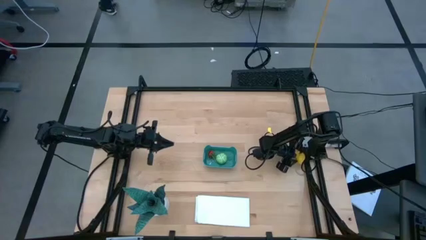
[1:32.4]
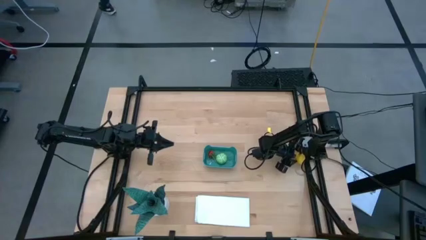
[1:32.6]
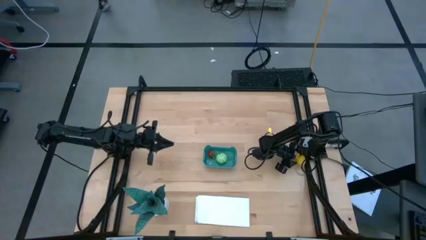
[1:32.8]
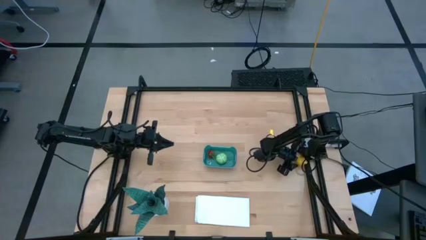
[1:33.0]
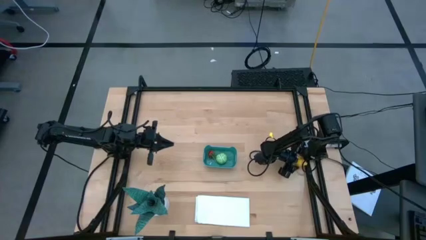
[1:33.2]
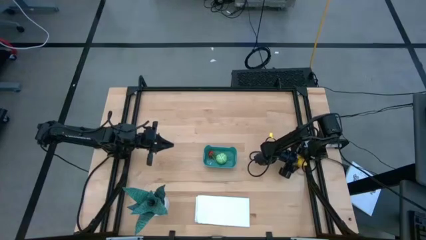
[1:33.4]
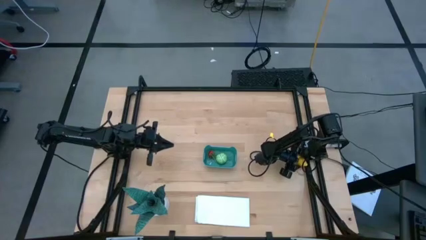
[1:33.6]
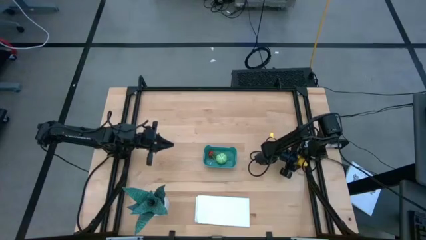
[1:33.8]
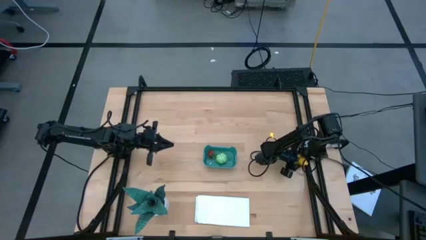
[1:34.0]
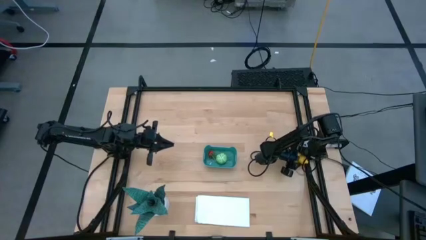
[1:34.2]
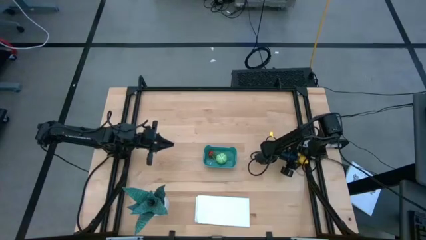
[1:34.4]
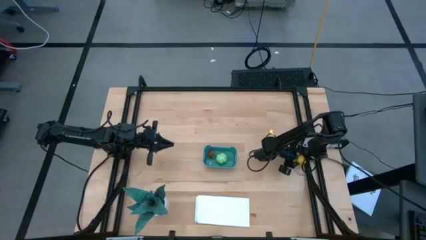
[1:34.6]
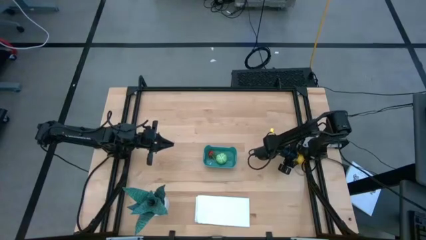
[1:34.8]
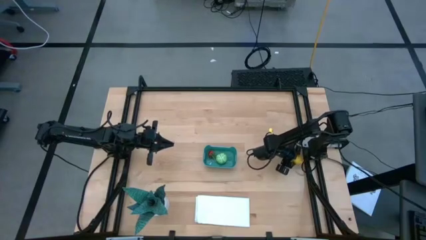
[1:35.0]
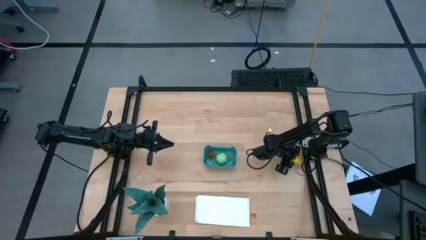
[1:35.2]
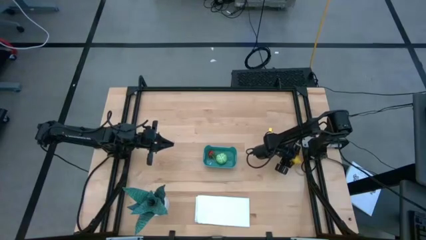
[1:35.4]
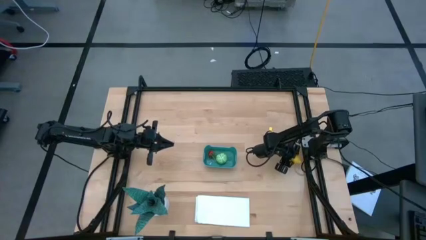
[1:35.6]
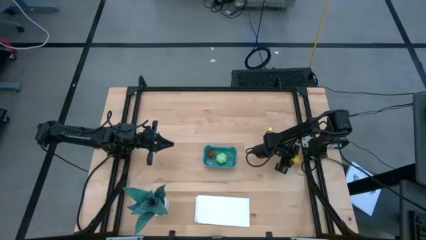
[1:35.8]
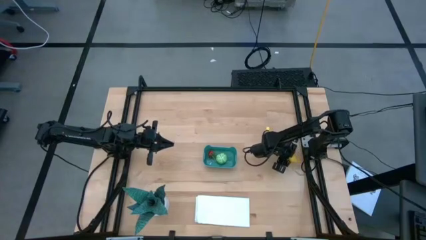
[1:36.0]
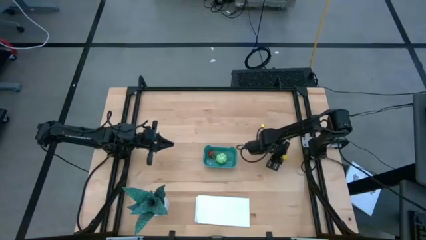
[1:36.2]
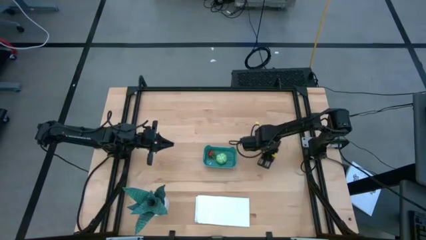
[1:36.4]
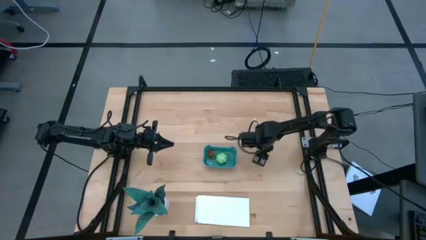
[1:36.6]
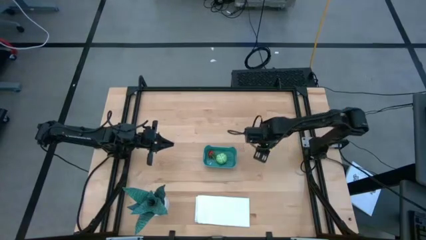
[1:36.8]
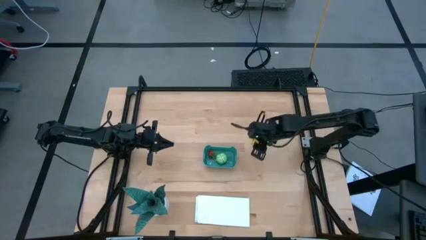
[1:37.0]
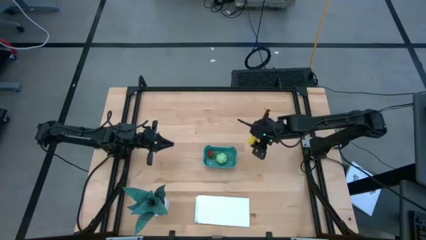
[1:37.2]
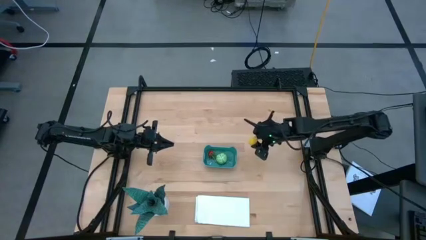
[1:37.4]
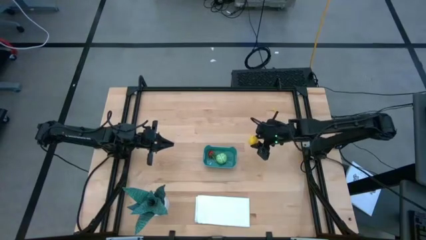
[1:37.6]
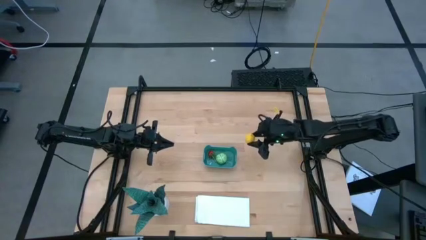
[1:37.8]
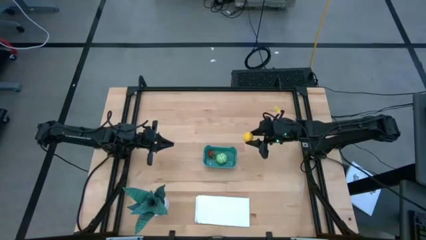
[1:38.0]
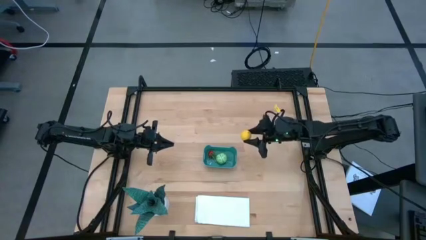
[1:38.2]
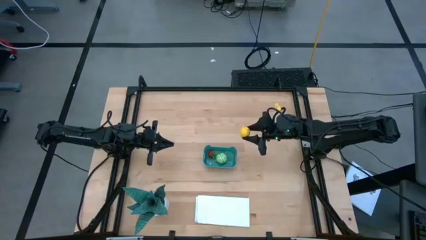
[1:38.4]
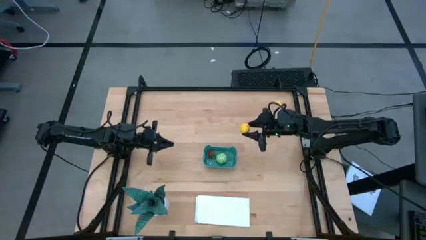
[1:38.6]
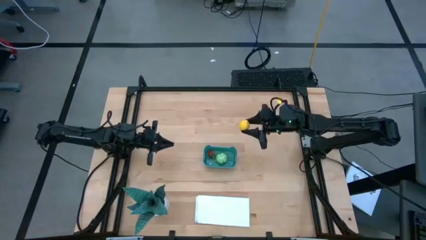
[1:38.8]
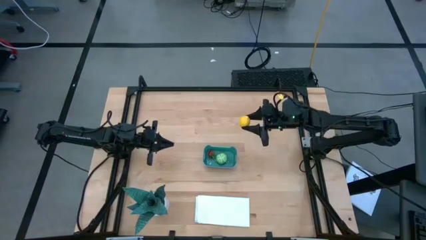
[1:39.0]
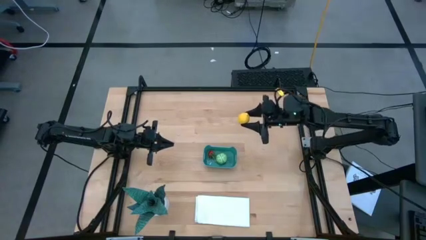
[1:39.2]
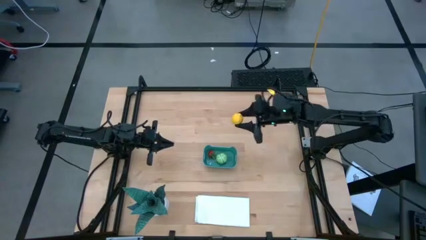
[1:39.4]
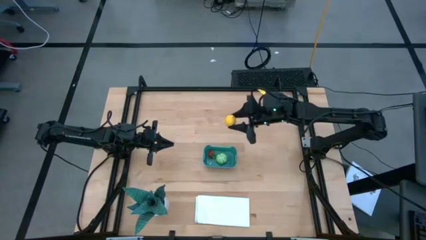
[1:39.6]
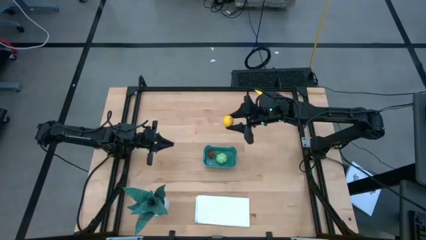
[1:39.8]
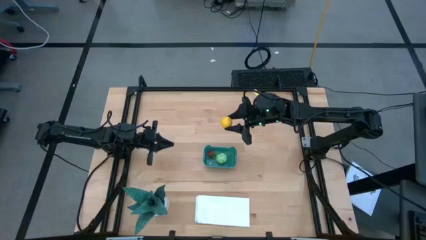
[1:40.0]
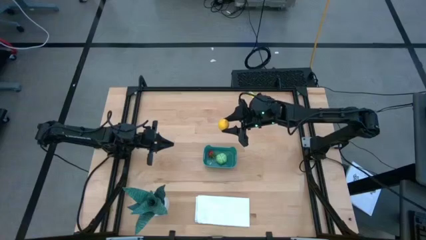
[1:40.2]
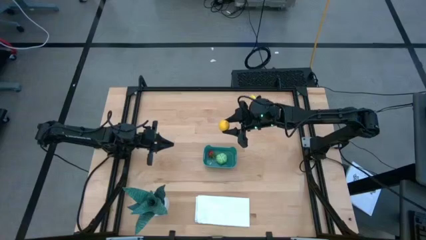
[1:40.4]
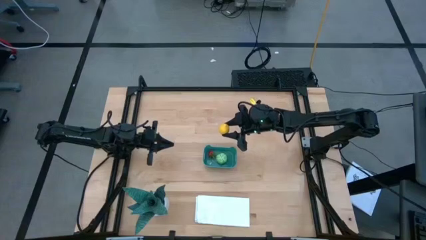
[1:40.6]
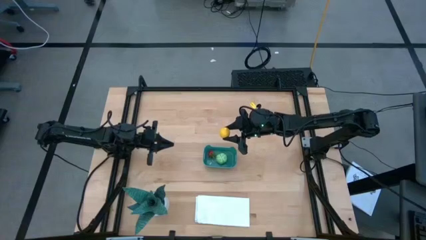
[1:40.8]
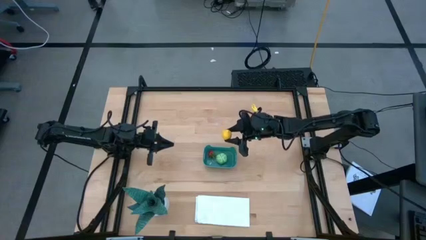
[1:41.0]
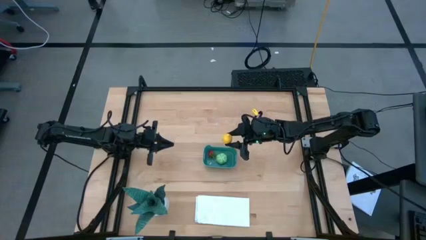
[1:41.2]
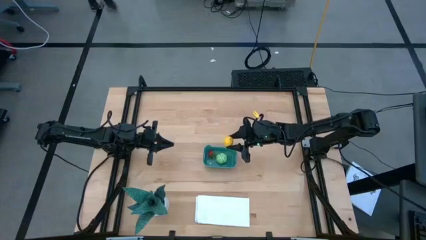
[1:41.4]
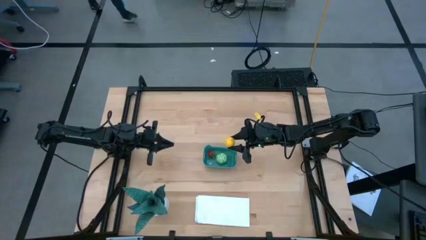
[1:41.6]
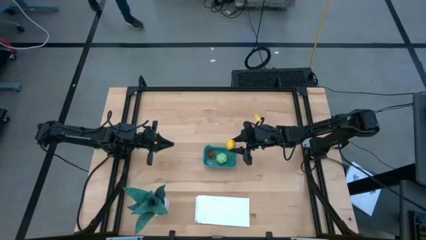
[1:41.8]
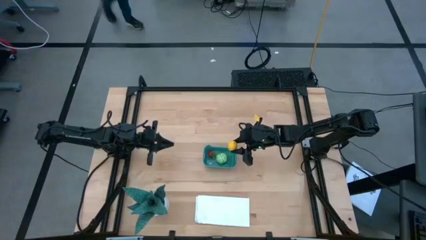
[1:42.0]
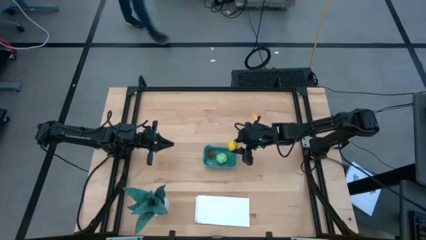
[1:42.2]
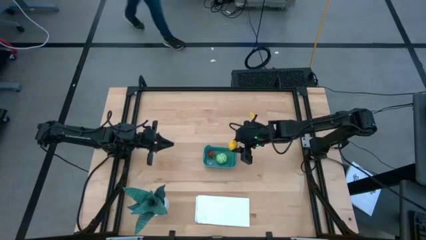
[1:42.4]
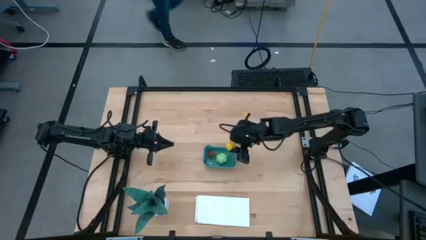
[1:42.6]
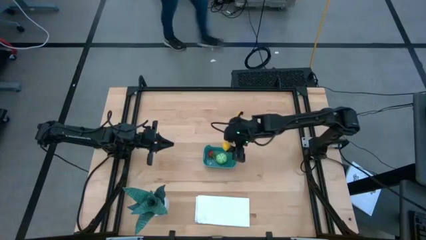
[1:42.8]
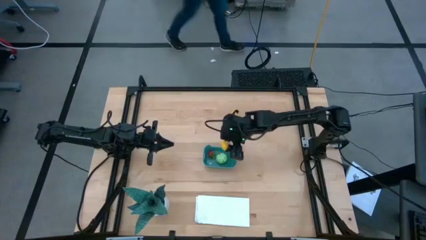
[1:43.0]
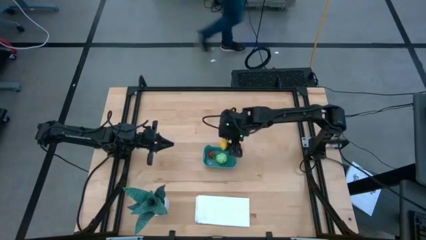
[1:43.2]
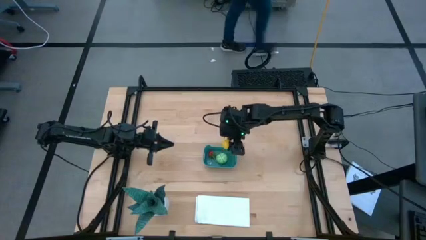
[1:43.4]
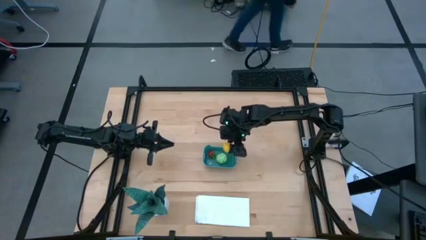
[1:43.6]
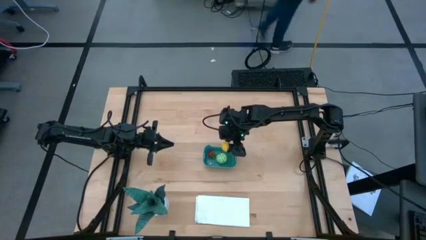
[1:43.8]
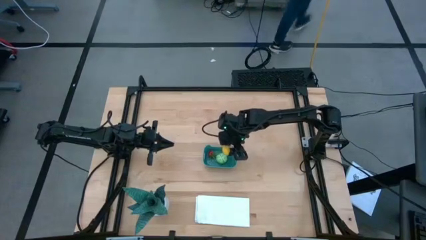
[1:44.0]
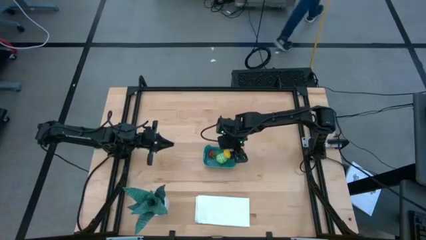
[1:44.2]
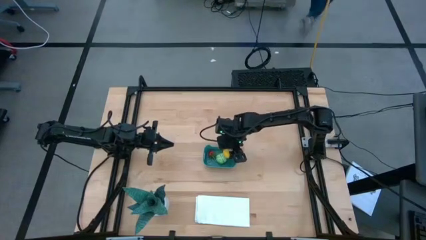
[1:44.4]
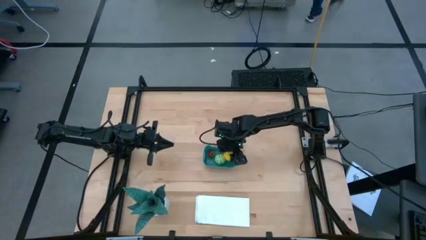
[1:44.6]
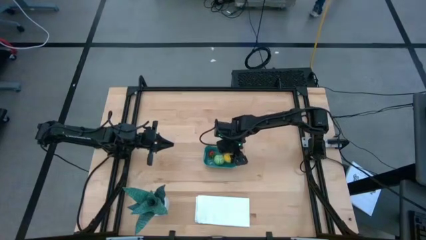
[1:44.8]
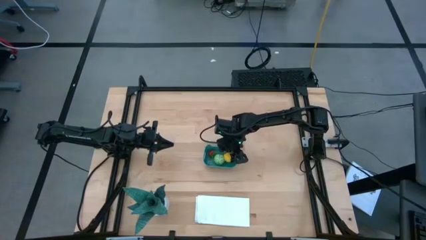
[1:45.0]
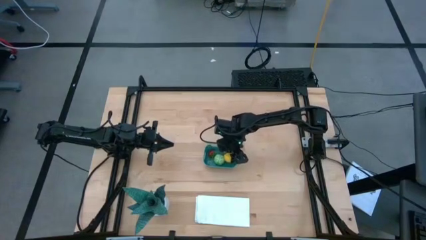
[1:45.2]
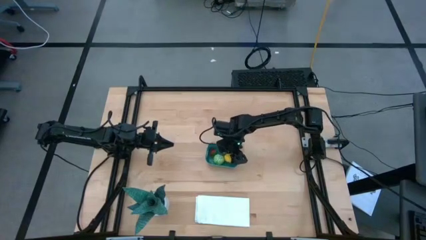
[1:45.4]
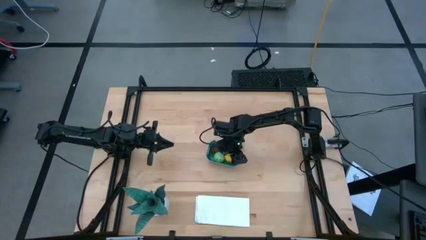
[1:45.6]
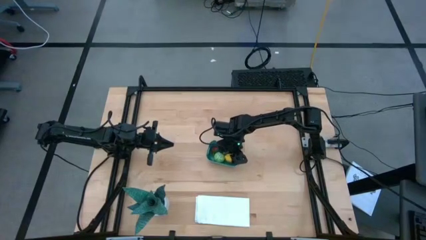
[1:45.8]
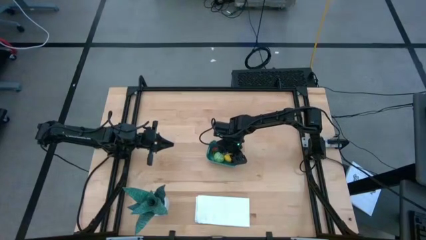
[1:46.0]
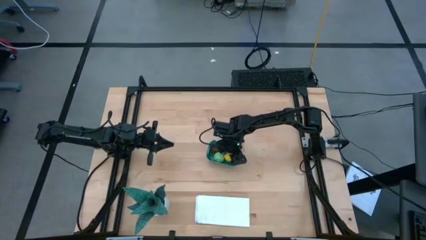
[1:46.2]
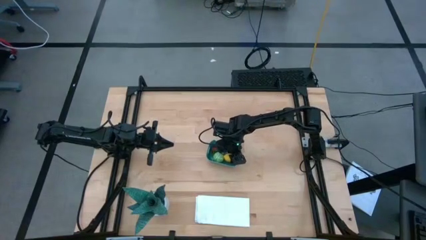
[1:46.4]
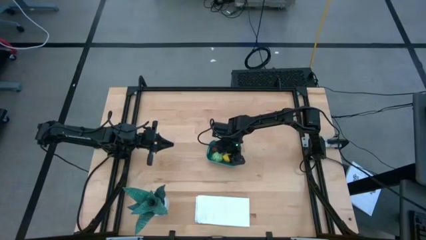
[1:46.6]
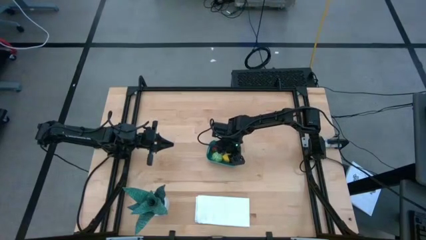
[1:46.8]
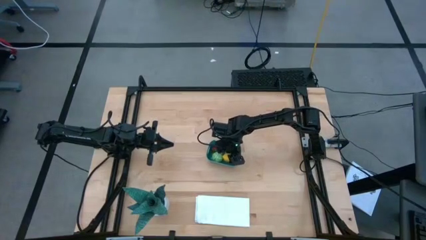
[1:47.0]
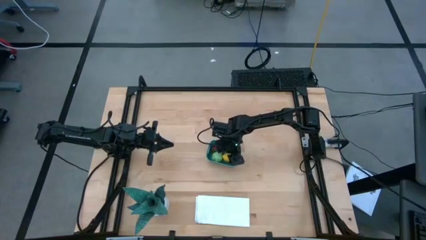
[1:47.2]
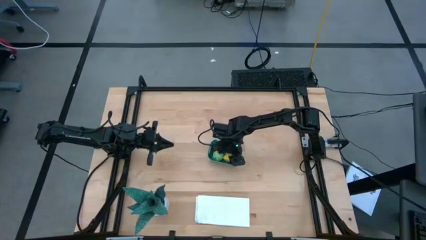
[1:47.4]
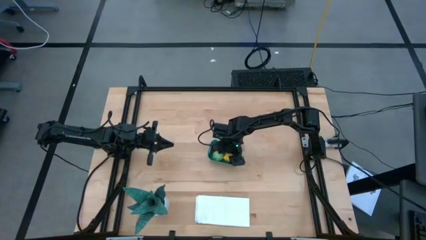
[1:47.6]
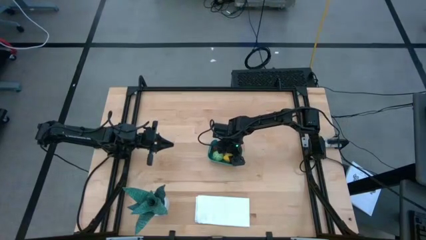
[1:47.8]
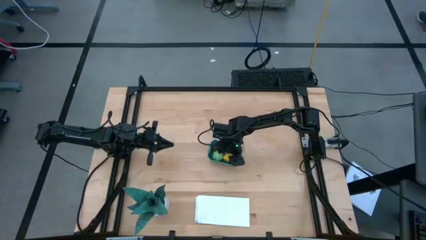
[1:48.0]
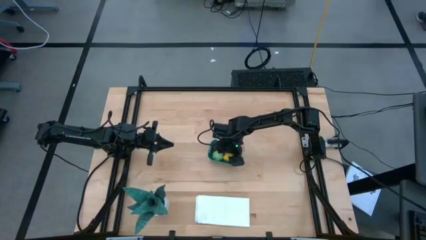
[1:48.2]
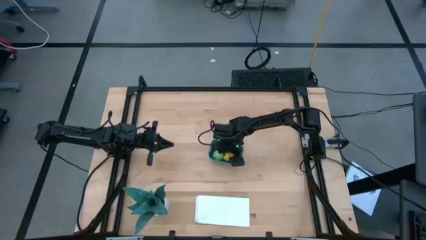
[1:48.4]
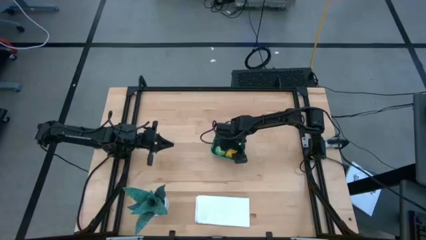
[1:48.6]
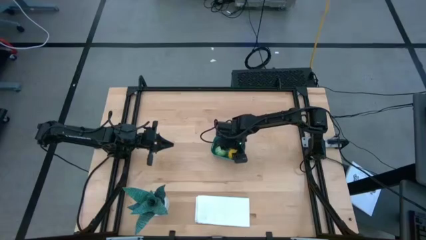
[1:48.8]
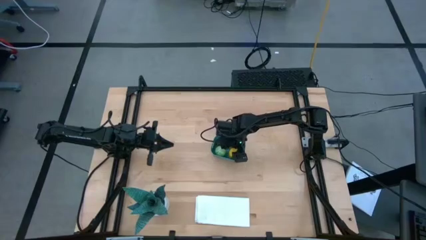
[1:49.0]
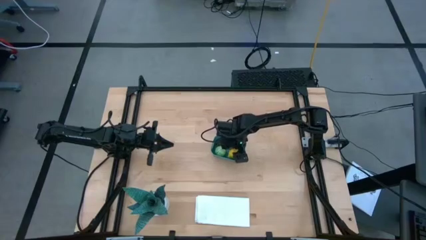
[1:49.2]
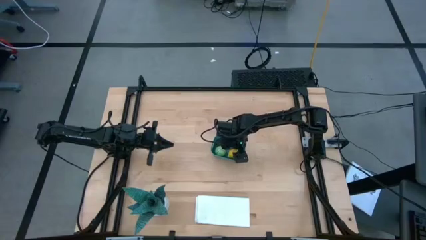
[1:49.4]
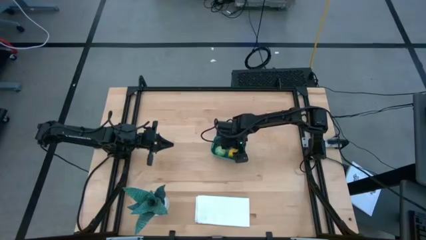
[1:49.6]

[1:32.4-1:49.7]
Task: Pick and placing Produce into tupperware
Put the yellow lemon into the blue bin
